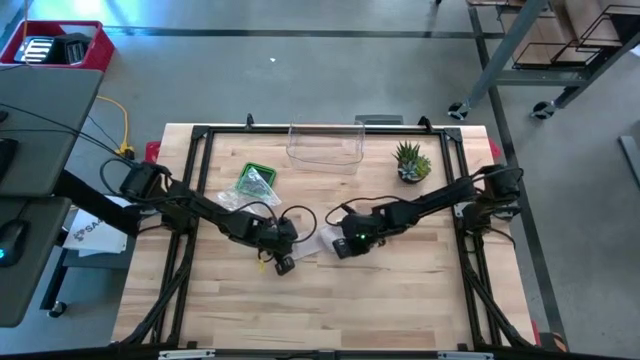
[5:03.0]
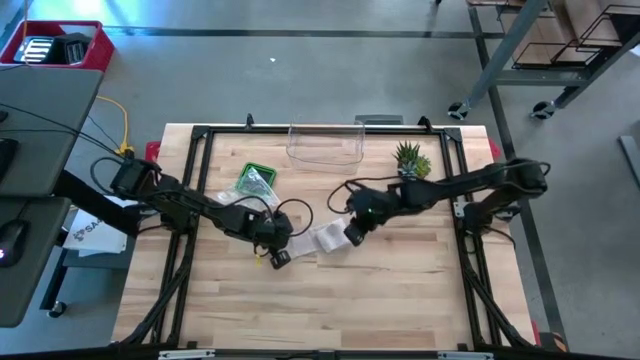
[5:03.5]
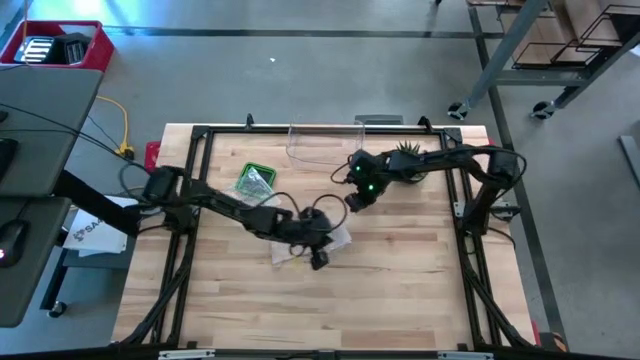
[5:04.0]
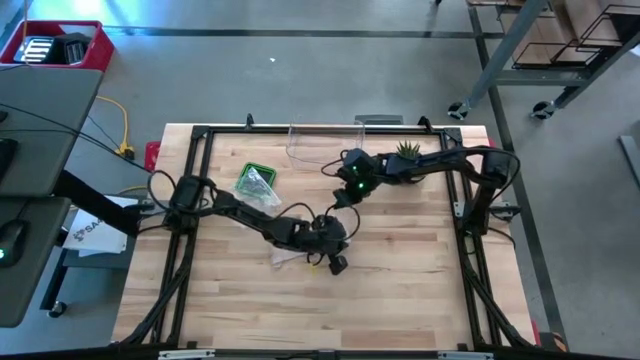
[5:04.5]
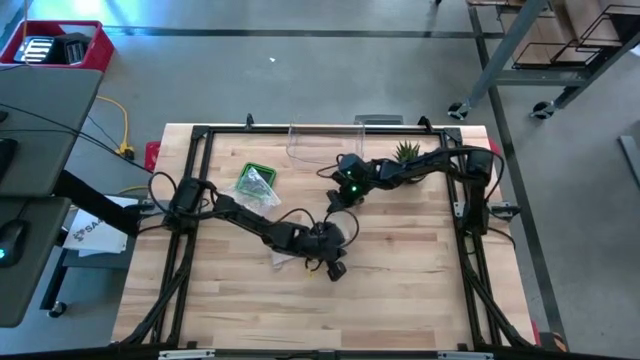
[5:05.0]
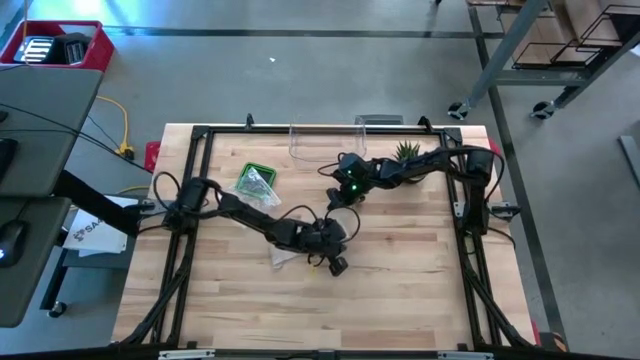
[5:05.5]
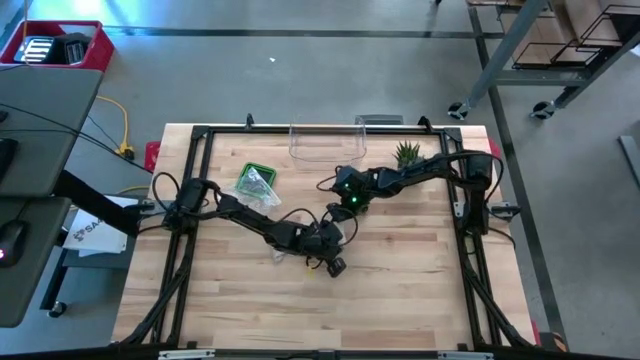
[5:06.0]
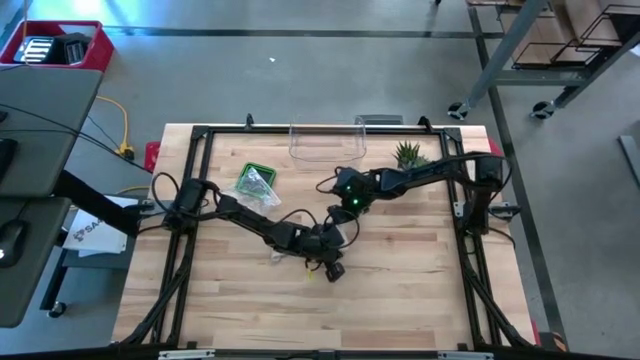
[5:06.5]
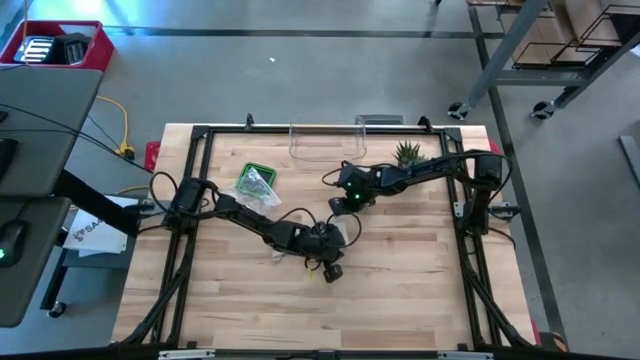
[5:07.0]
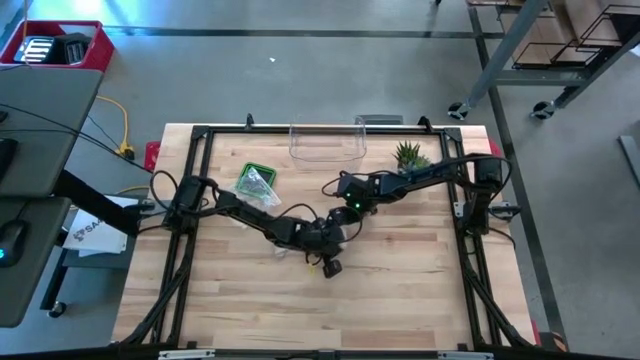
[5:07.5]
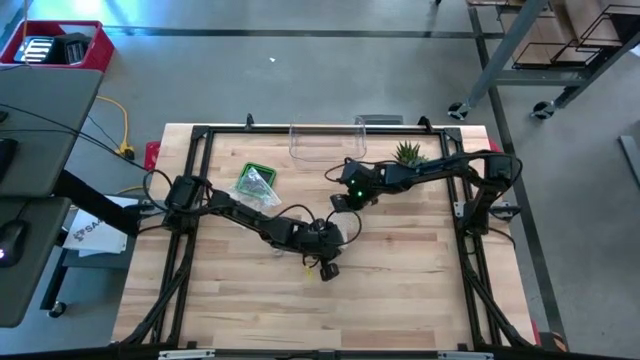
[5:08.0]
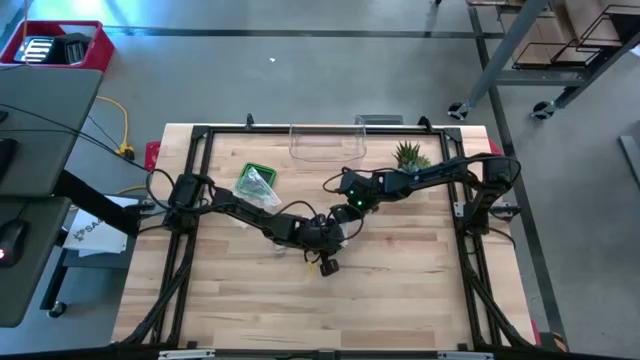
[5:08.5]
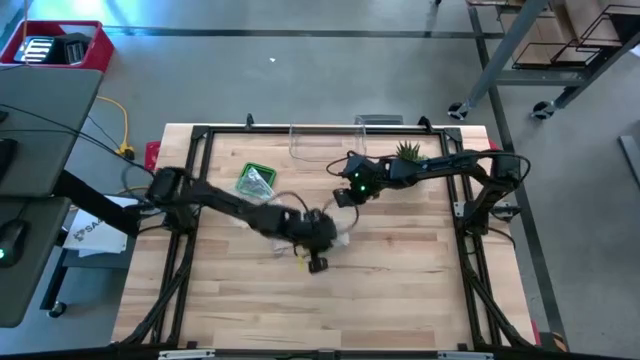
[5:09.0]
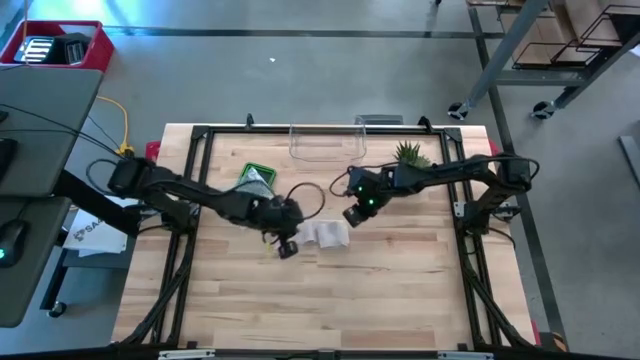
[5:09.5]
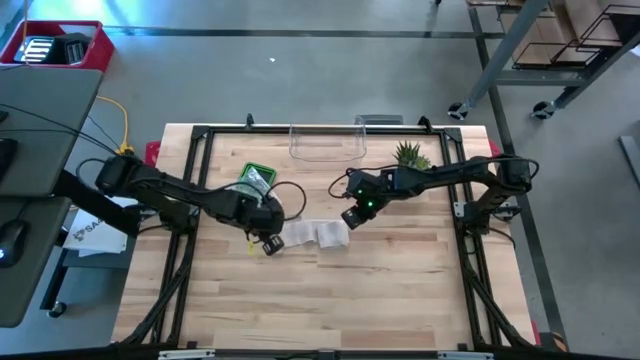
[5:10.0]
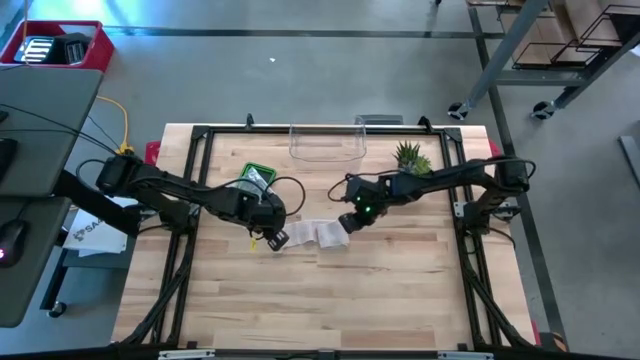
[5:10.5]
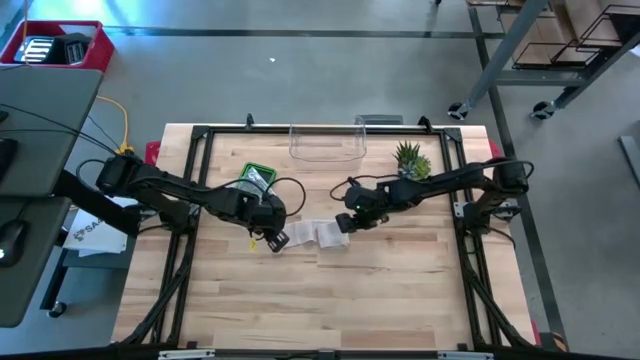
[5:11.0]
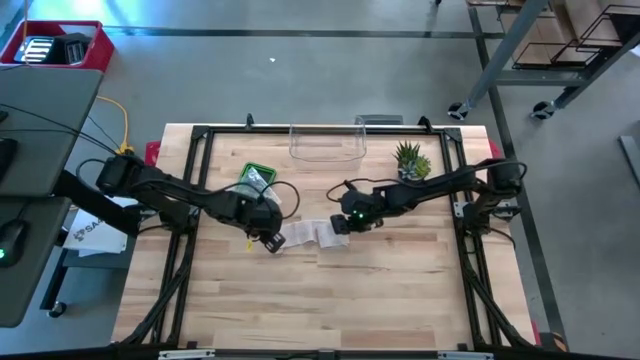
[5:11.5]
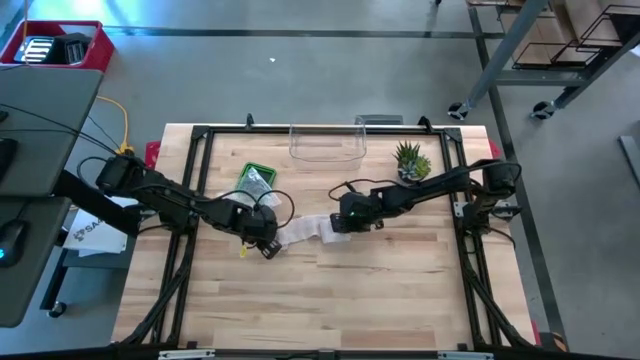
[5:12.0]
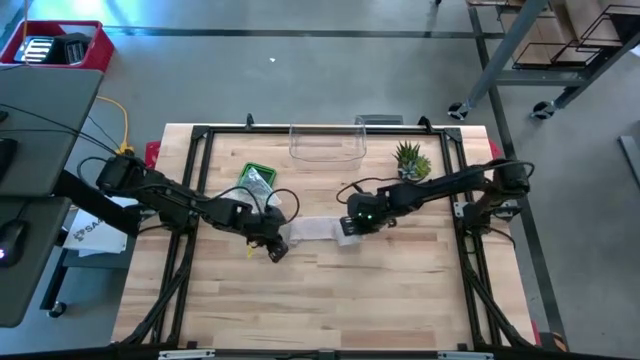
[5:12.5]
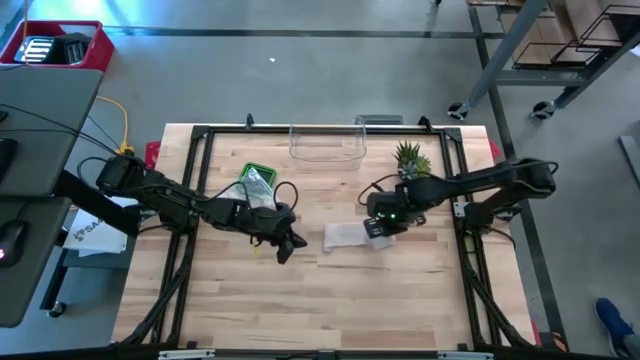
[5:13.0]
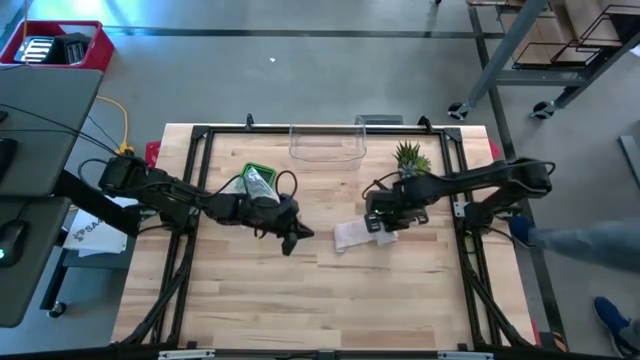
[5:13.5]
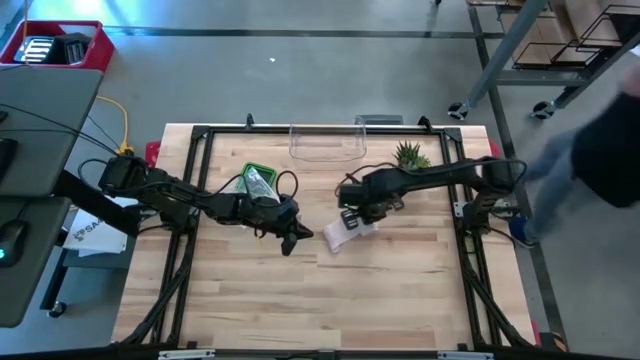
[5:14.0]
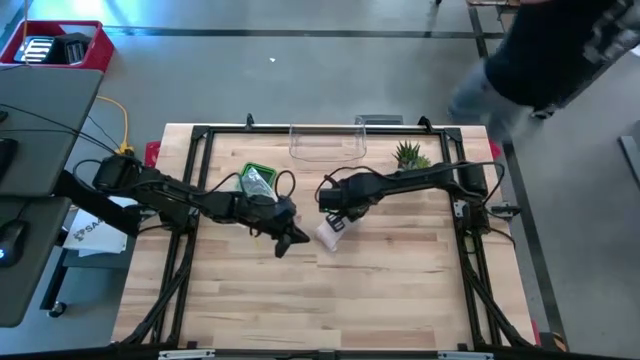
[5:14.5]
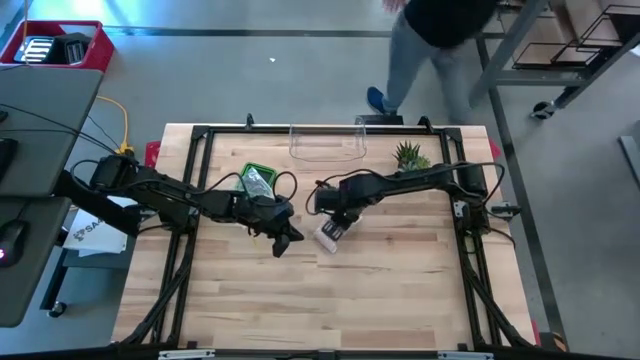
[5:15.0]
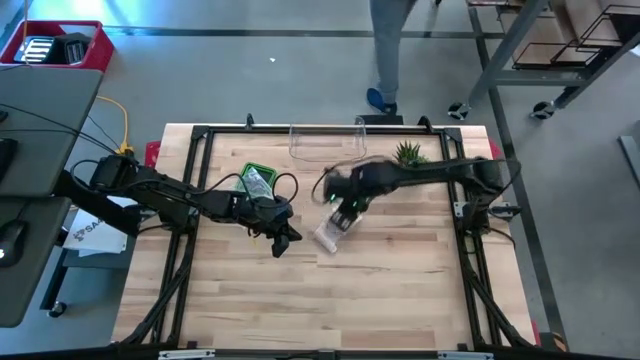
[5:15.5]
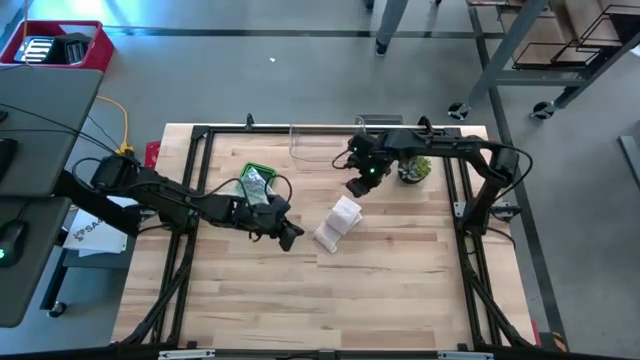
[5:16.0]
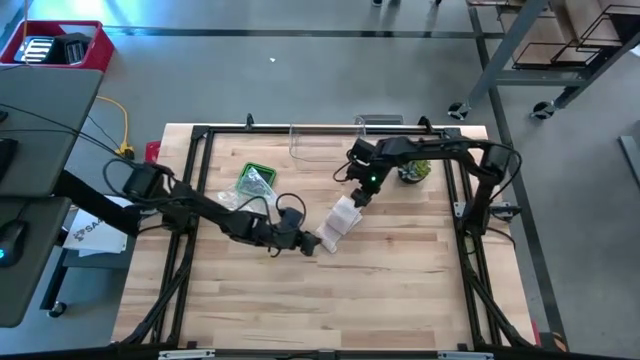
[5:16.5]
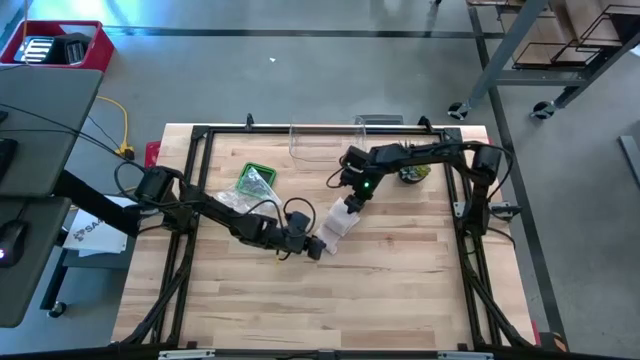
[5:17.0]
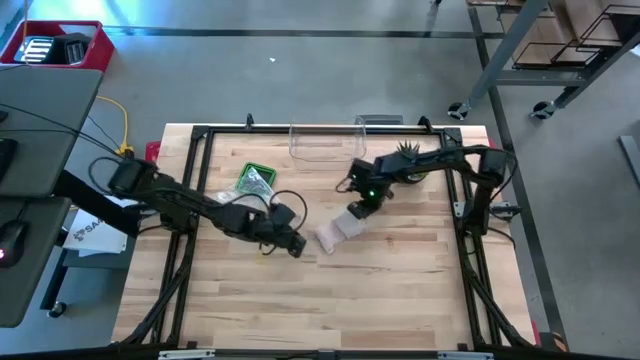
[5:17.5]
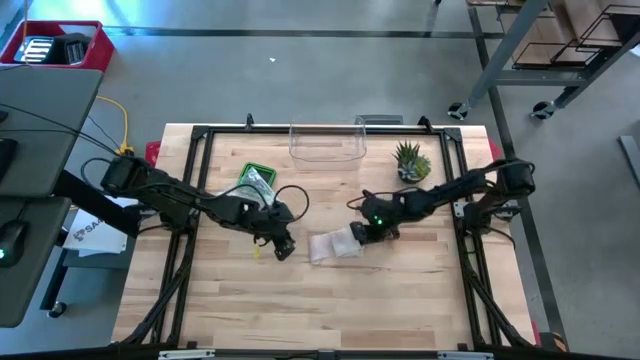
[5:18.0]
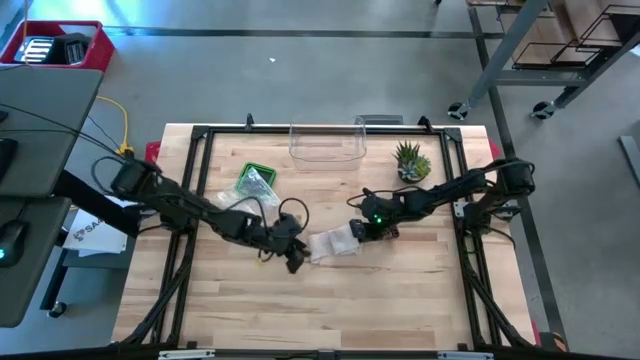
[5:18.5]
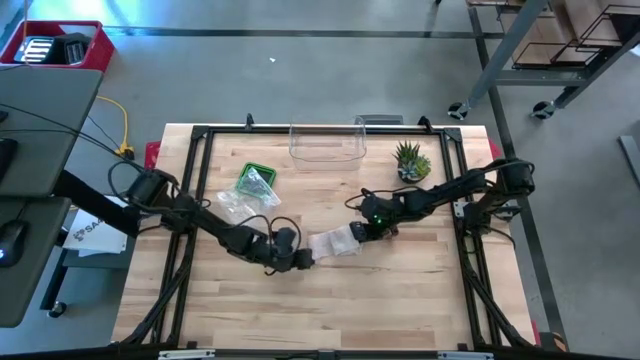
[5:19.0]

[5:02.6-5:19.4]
Task: Roll bandage
Roll the bandage

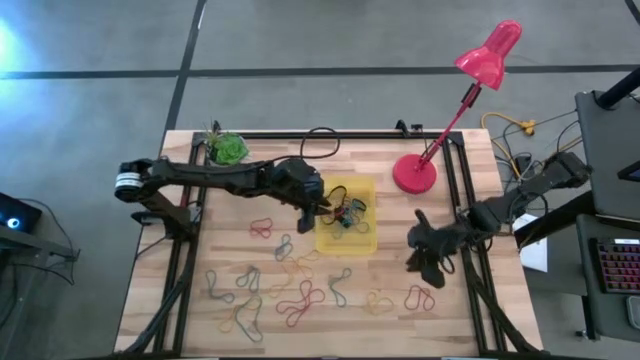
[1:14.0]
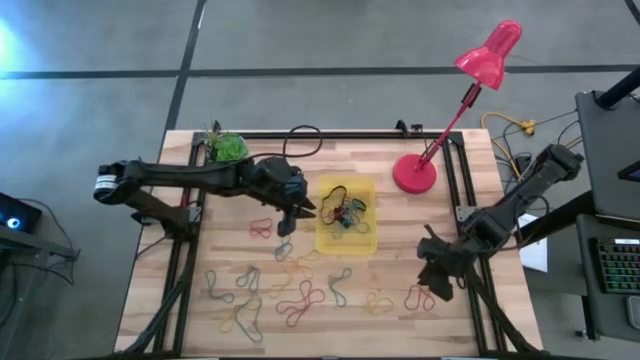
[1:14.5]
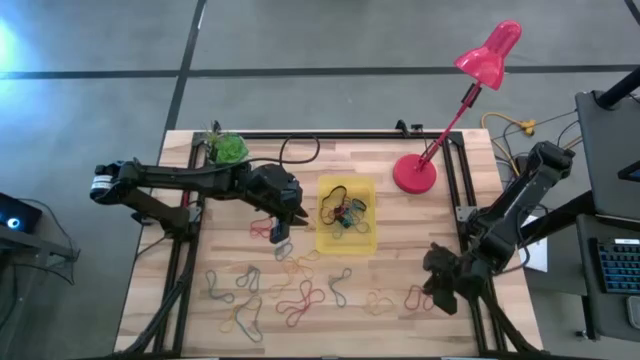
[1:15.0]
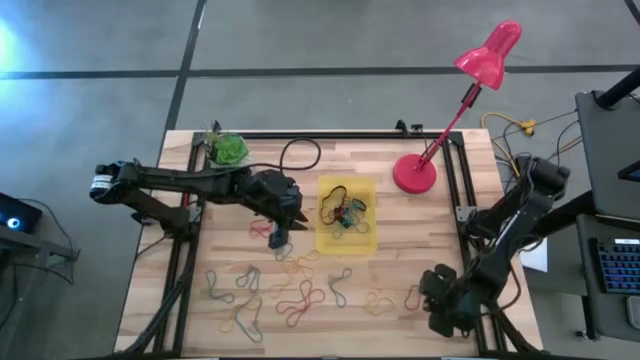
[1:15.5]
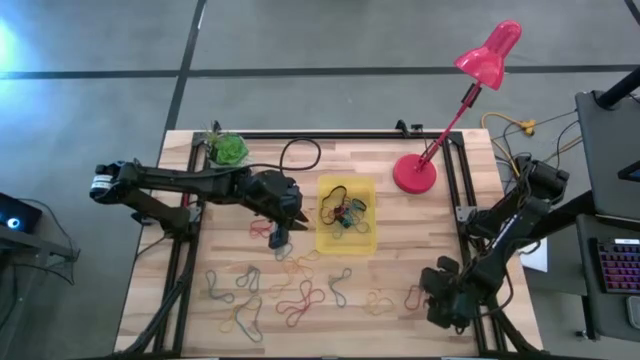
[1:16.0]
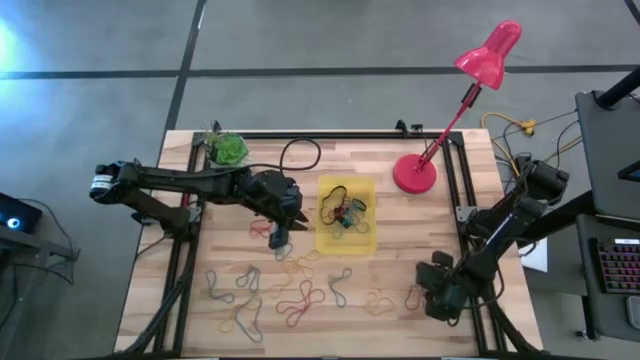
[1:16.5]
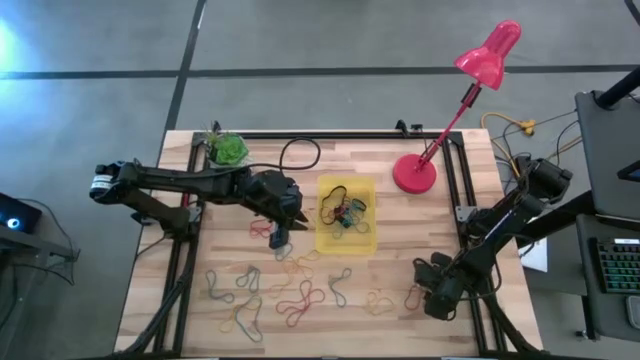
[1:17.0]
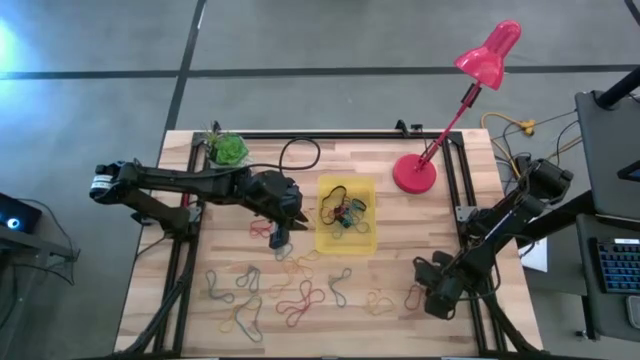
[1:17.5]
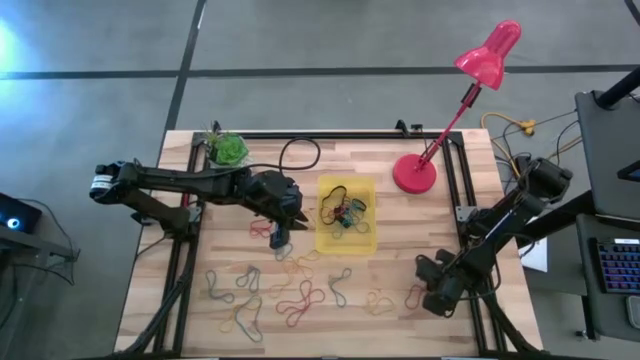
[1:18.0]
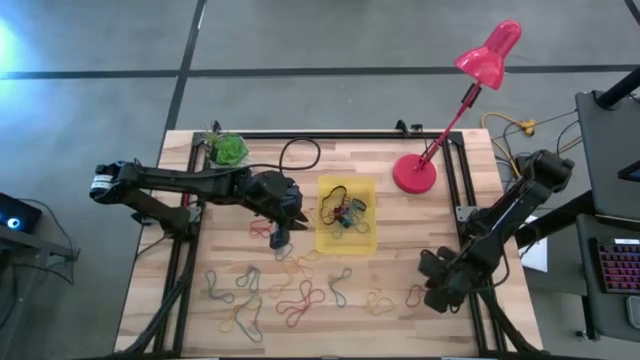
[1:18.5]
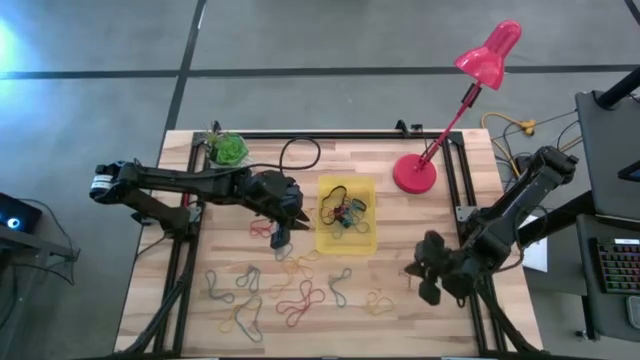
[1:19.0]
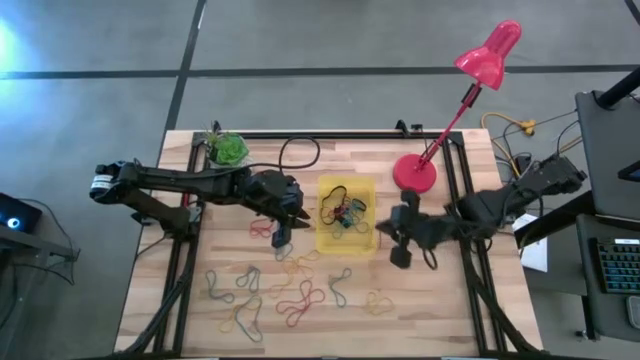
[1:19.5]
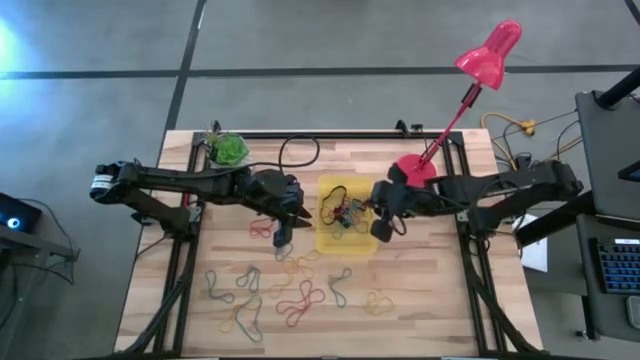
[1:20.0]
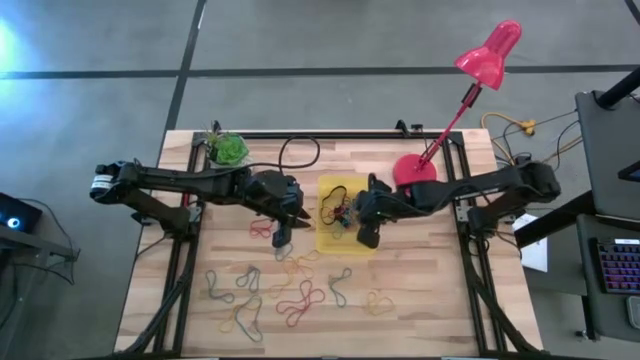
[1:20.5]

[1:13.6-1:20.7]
Task: Pick and place rubber bands into bin
Put the red rubber band into the bin
